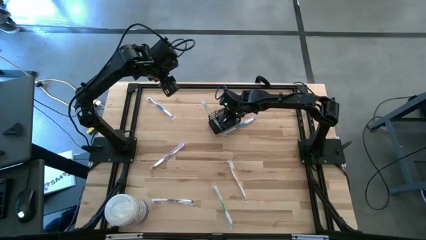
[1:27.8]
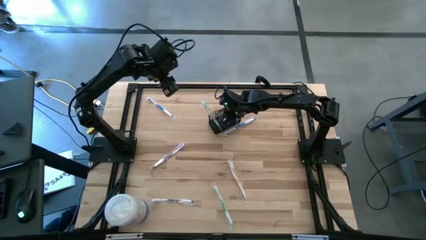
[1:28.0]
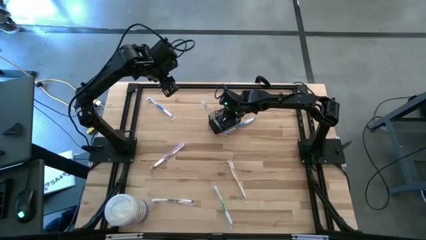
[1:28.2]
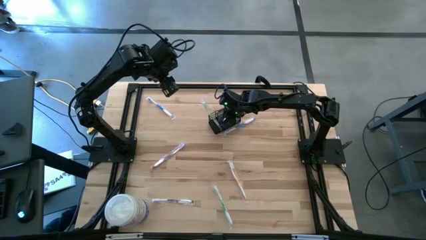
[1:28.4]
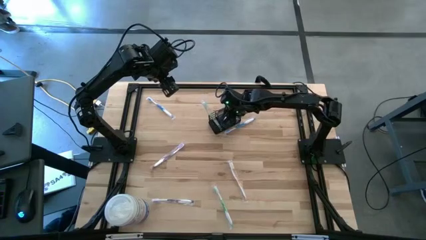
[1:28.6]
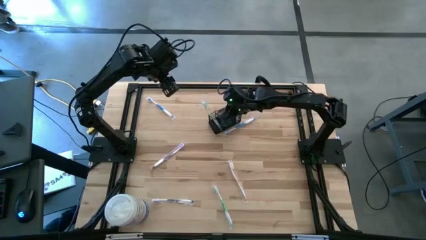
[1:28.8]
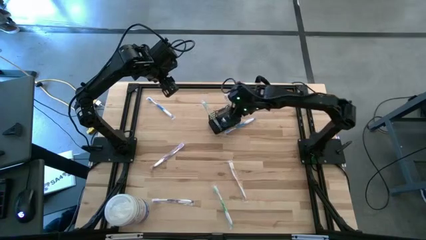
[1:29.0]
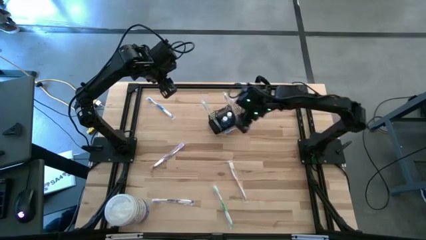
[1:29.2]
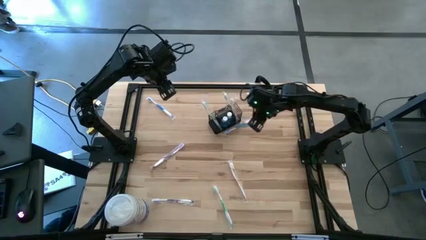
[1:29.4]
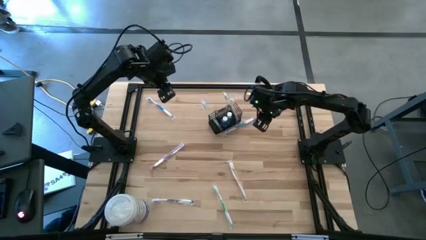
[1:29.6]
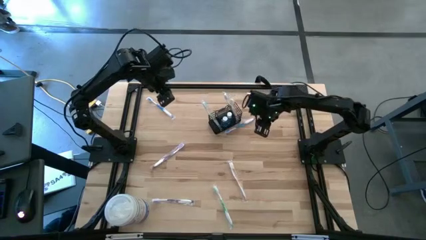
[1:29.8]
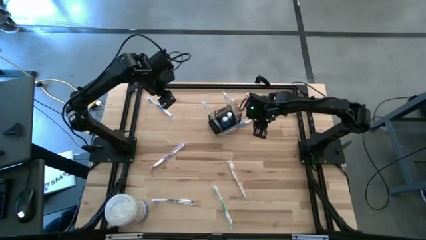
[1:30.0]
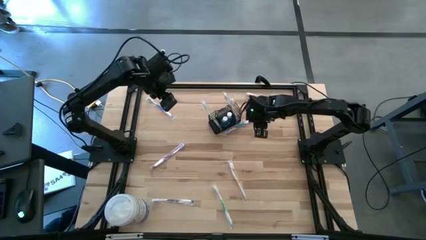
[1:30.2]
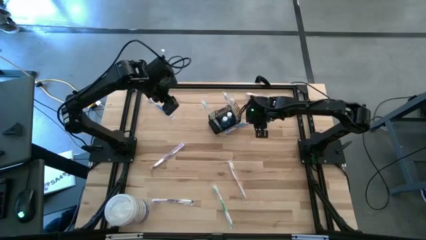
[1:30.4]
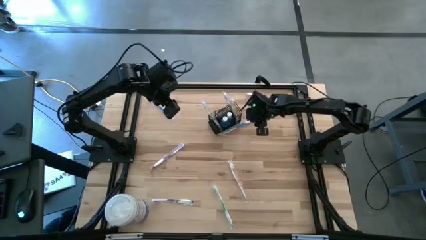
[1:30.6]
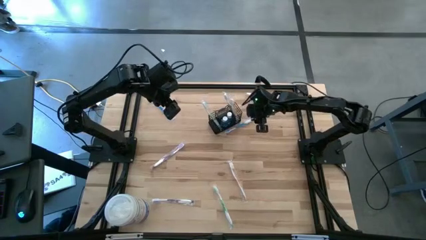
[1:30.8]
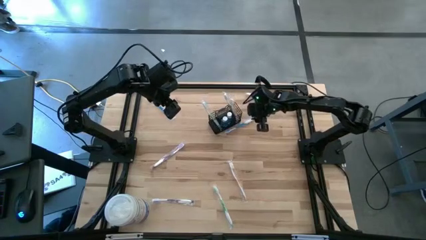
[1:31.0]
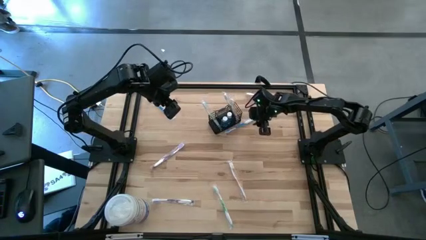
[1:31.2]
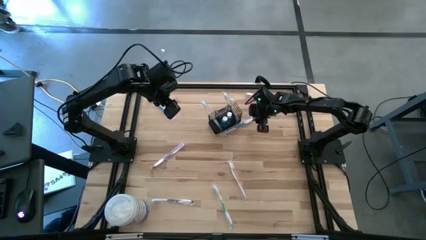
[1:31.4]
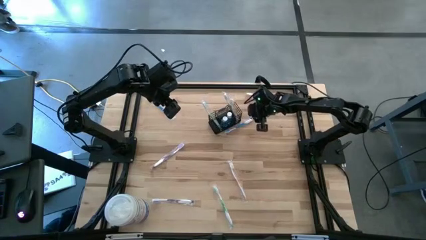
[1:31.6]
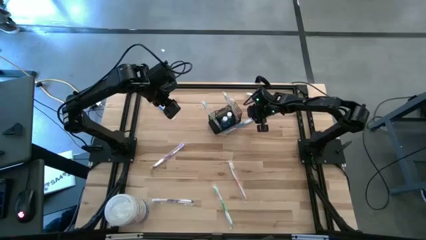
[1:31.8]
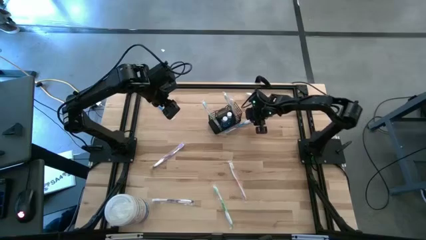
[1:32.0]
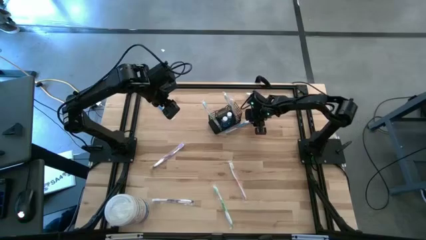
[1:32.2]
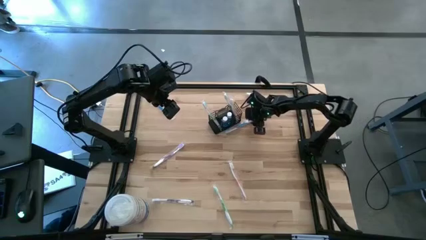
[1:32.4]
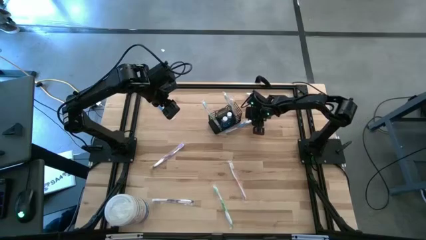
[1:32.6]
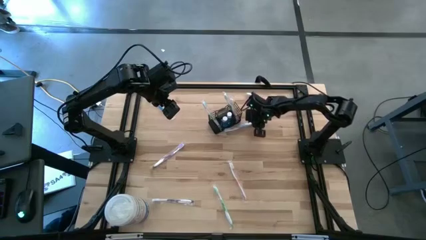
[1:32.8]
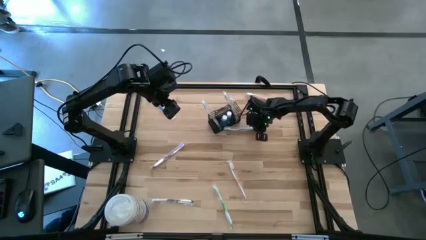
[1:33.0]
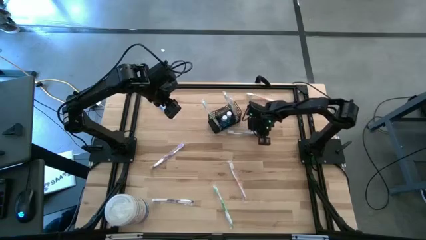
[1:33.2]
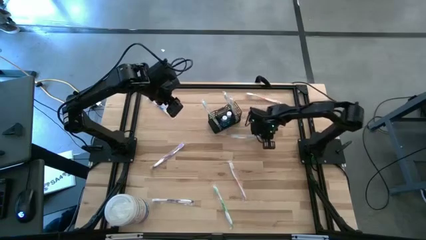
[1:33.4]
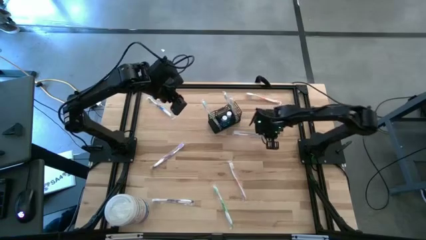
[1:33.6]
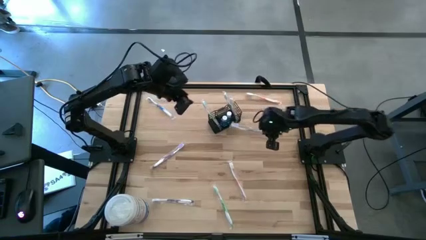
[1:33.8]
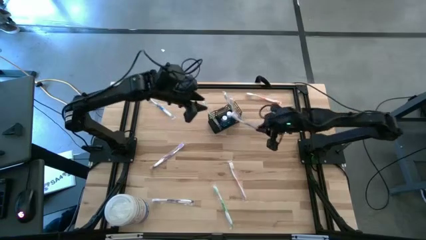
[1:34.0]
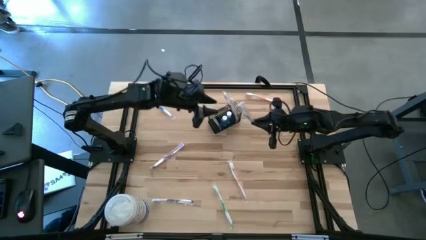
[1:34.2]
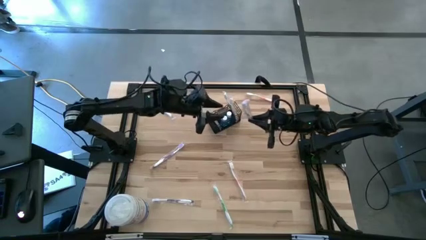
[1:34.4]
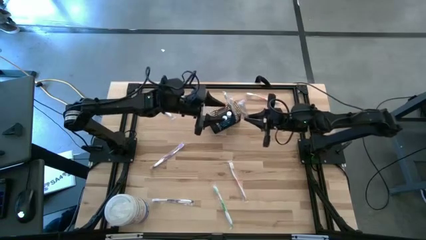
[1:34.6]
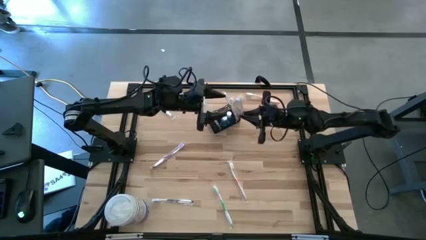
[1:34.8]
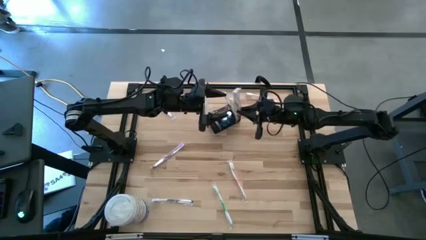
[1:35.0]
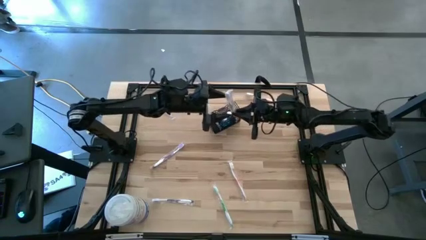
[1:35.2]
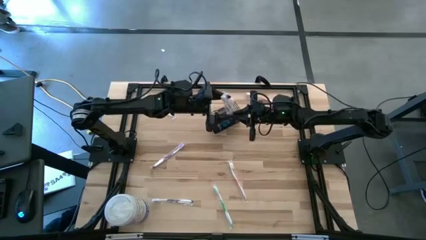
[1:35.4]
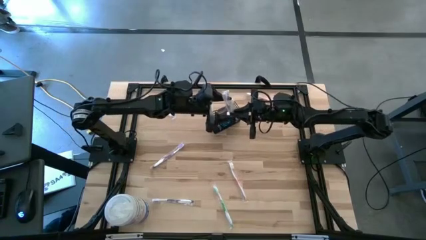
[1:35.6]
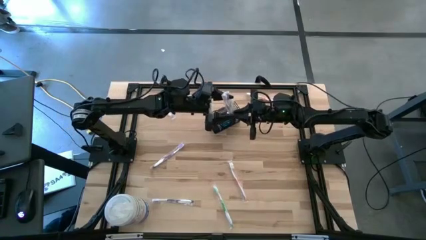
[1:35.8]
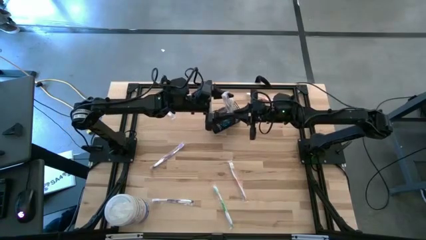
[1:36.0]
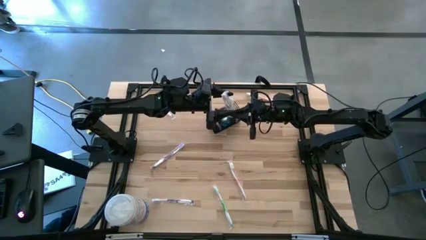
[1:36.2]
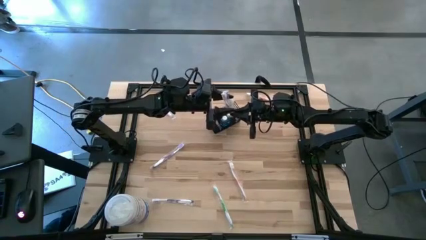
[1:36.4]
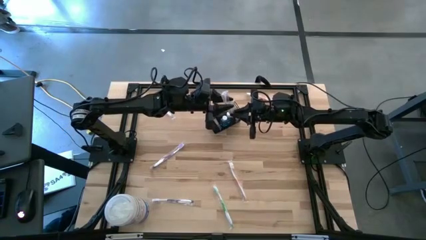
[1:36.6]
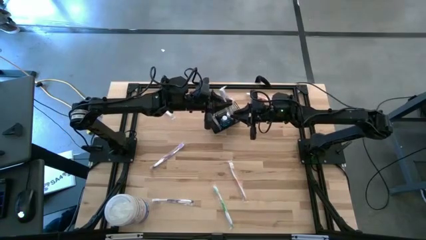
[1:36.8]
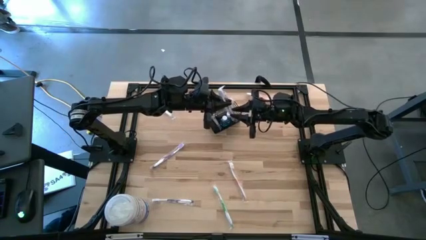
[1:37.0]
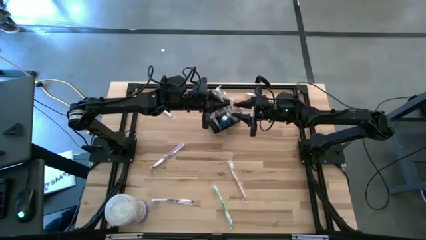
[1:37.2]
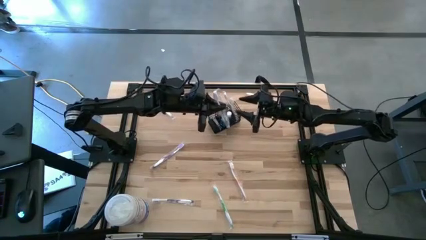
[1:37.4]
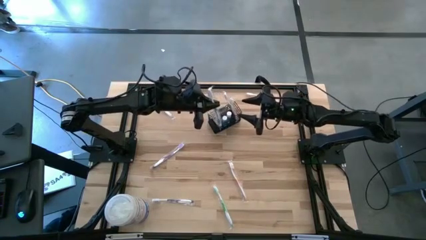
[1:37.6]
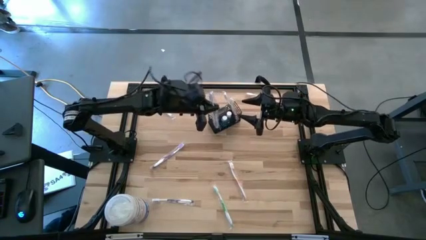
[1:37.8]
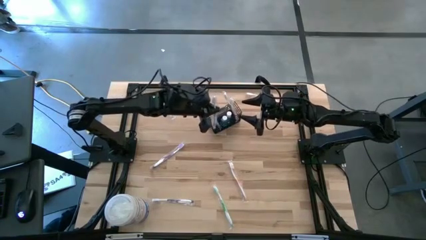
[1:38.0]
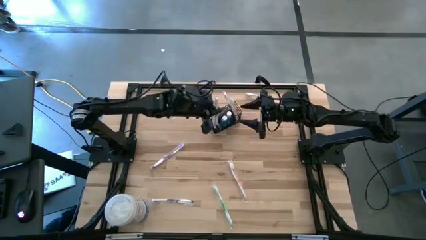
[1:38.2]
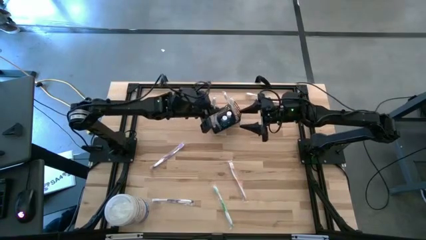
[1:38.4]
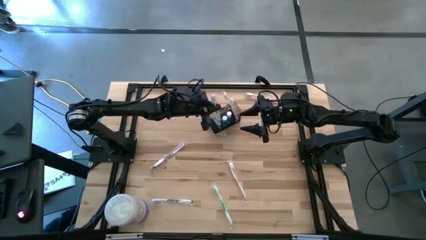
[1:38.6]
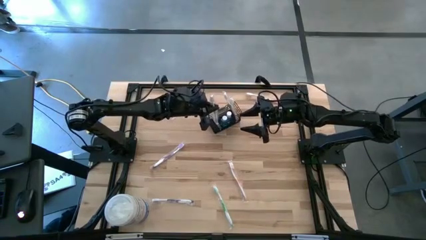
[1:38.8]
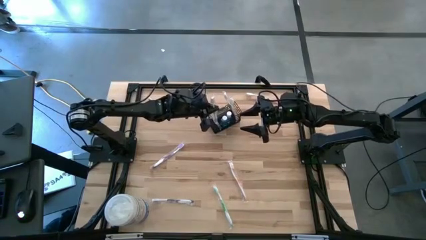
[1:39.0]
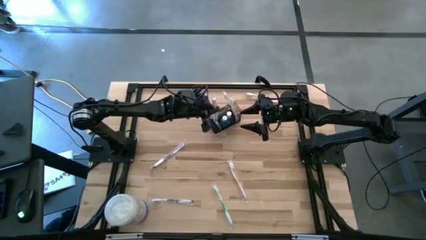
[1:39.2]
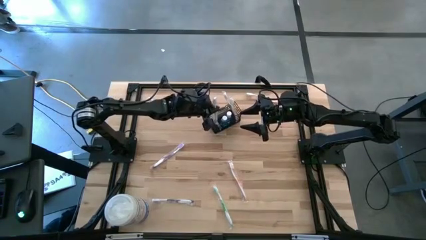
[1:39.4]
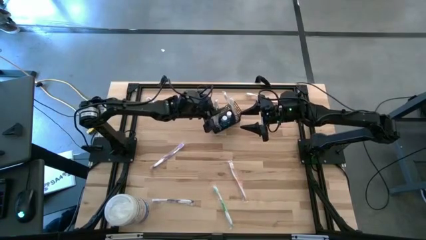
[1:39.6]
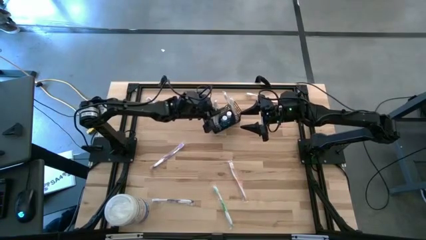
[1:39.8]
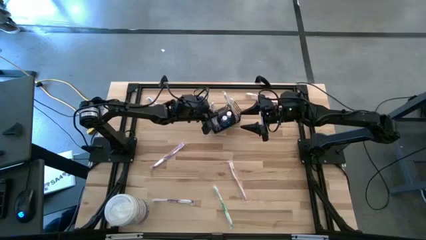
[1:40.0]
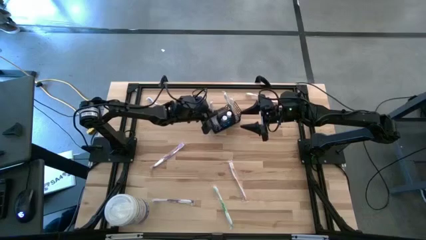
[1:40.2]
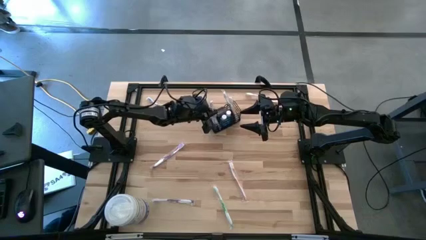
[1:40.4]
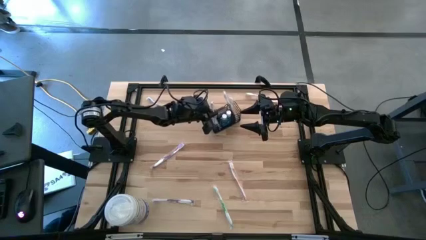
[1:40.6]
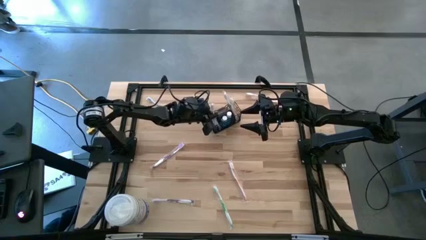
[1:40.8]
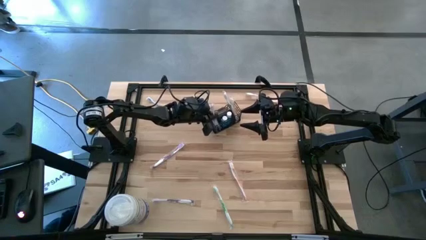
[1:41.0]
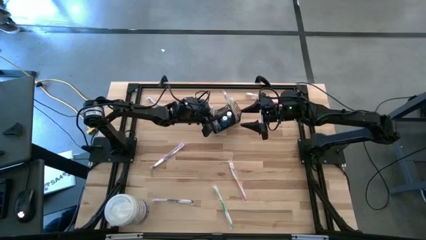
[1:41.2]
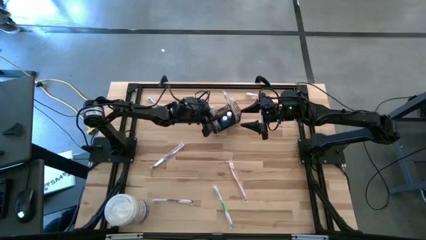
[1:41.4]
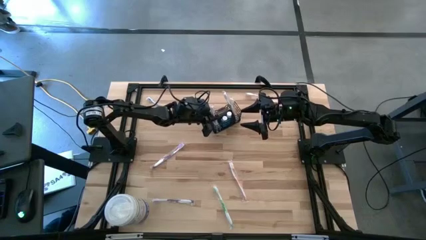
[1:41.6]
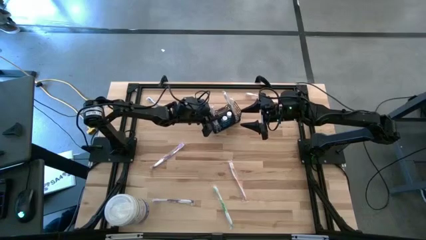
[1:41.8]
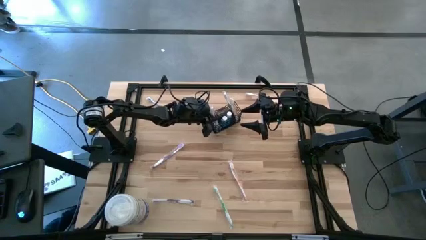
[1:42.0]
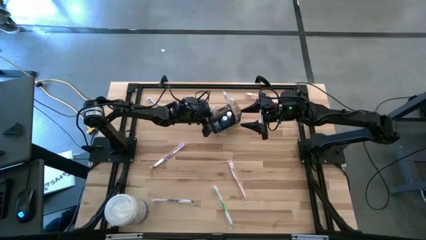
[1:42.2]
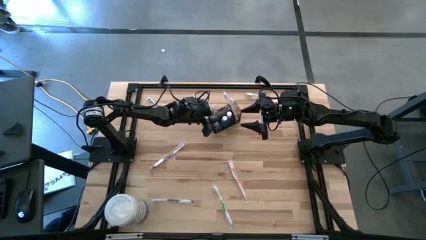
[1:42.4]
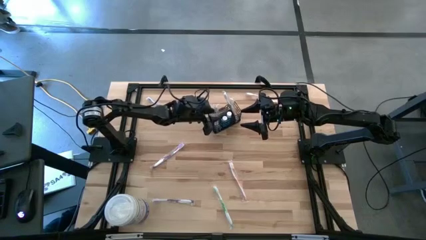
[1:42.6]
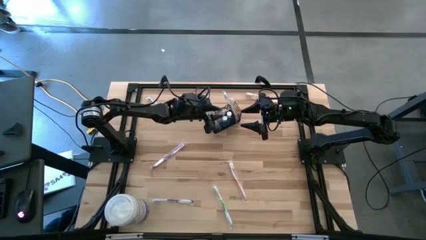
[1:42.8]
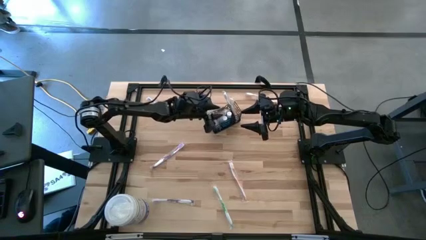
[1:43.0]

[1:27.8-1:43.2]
Task: Pick & Place toothbrushing station
Put the right blue toothbrush into the mesh organizer

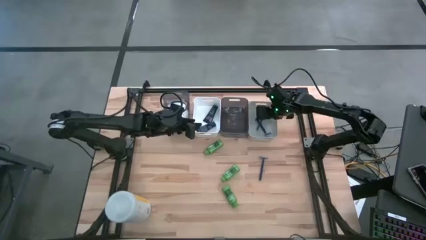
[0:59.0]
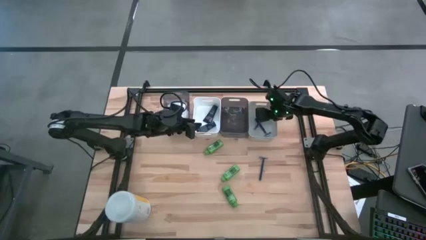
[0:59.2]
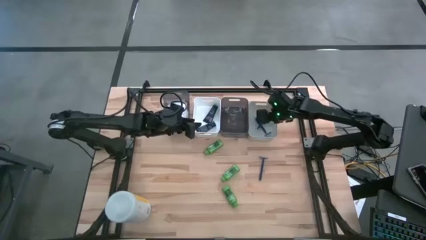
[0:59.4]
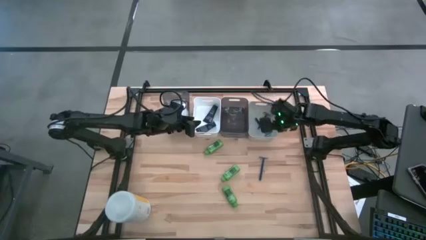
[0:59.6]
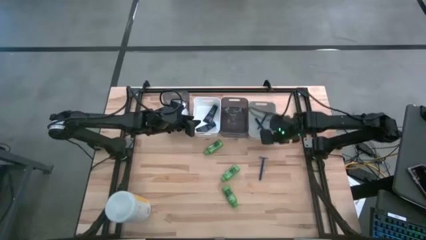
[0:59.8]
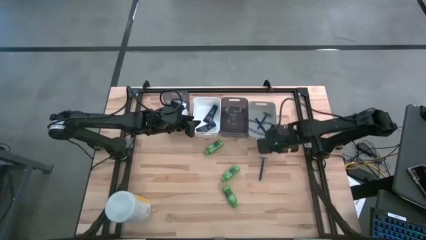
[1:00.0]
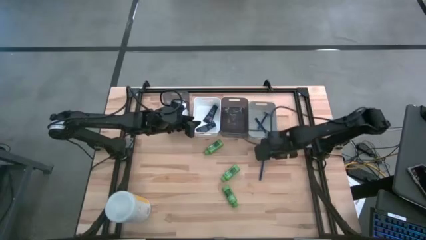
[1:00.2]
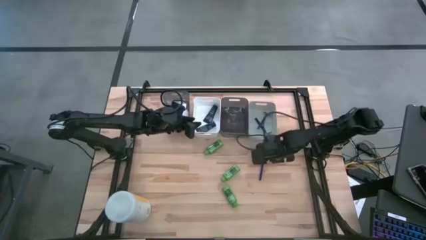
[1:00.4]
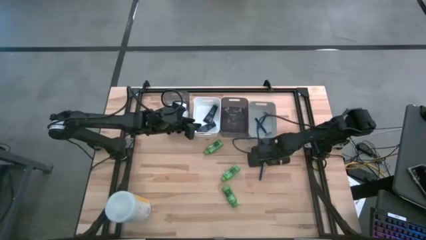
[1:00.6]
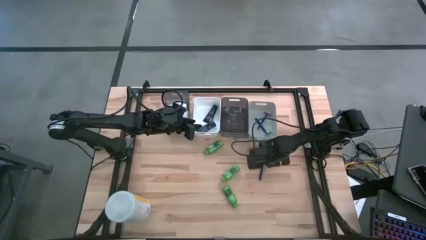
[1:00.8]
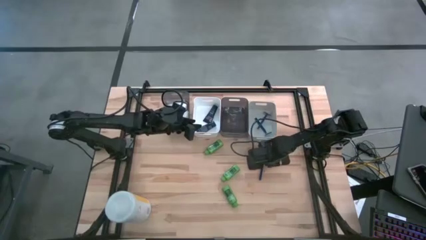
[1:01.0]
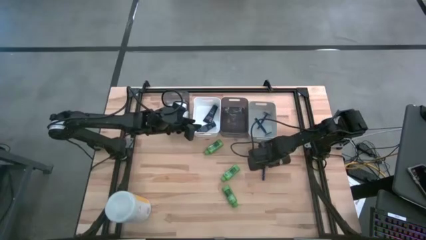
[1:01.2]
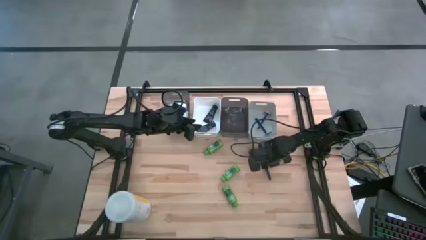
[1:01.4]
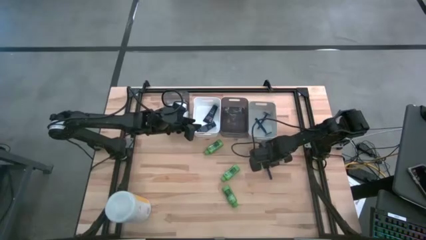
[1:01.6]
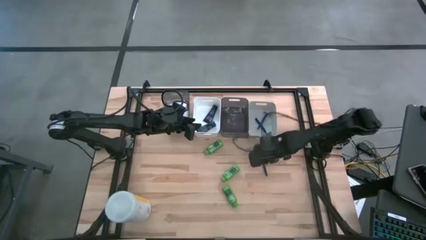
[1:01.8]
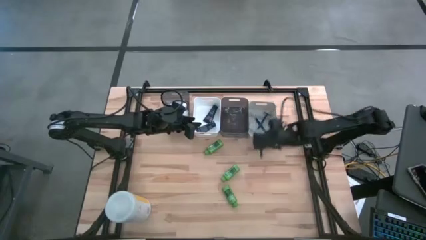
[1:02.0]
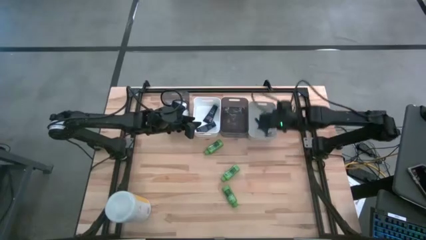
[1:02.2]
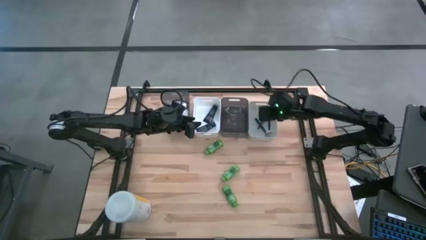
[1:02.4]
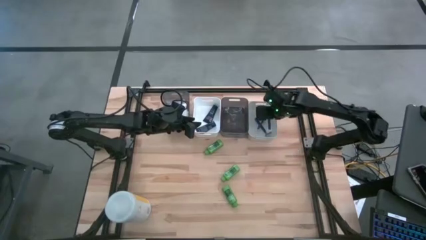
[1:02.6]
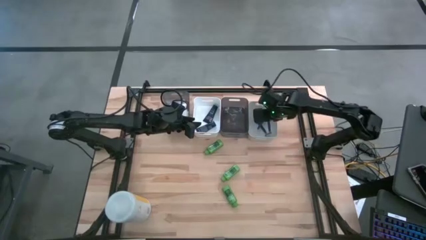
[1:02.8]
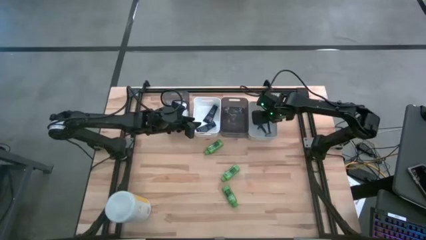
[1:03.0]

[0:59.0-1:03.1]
Task: Pick & Place Travel size toiletries
Put the razor into the gray bin
